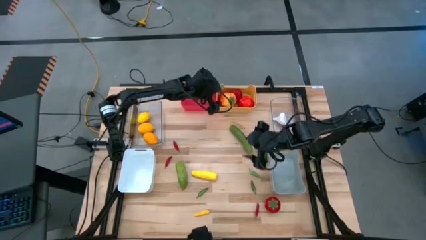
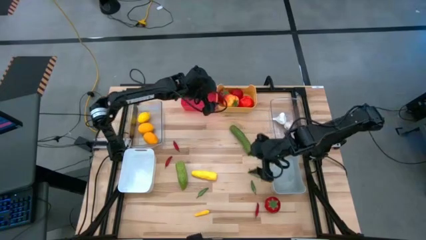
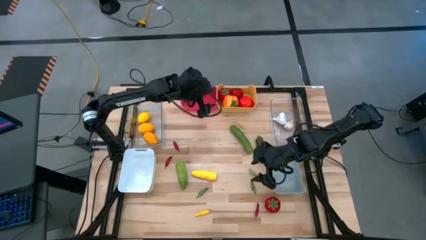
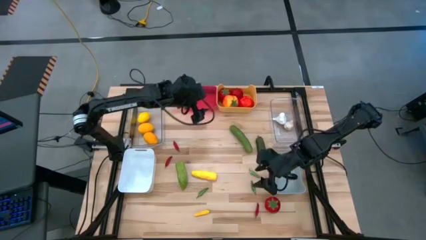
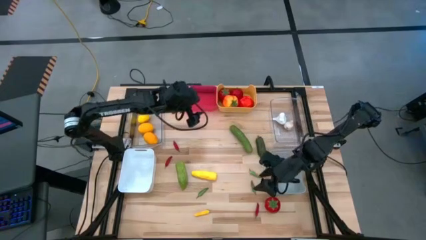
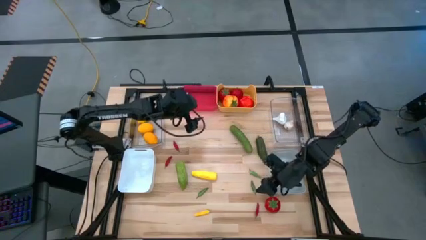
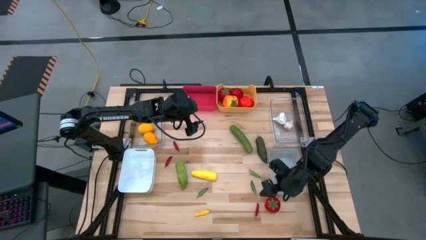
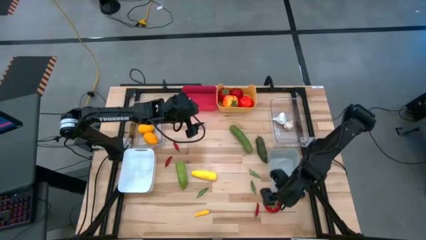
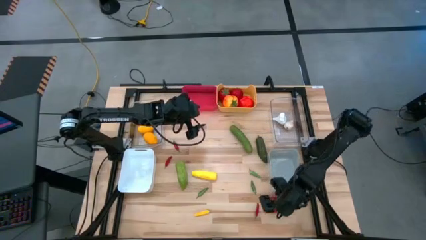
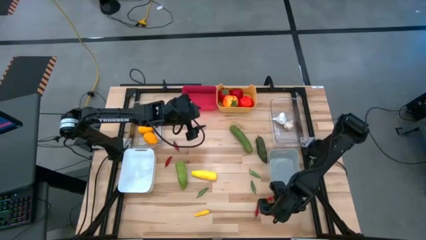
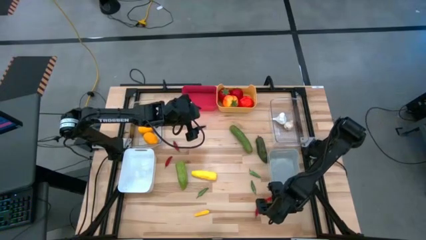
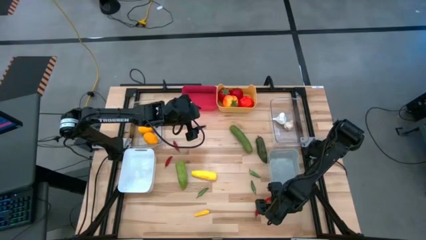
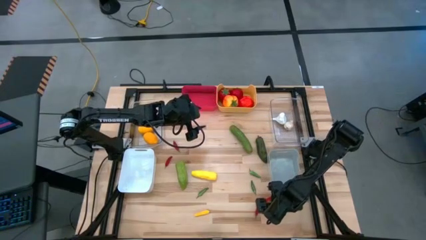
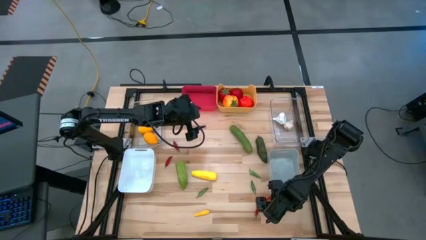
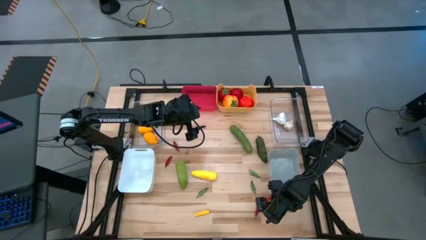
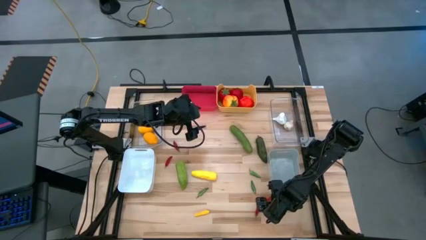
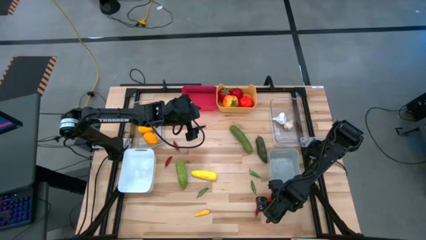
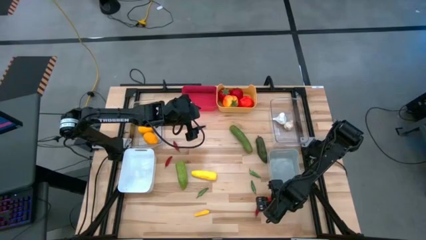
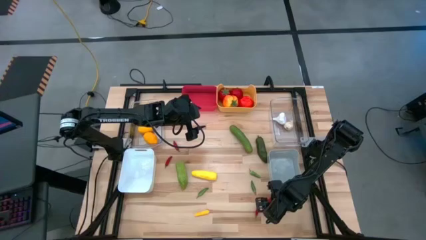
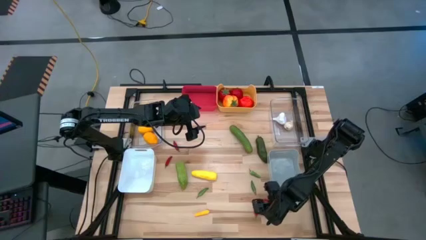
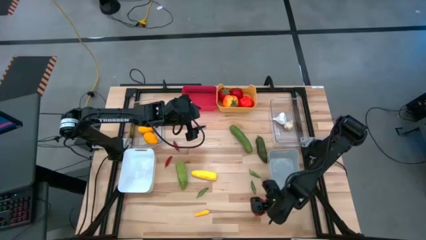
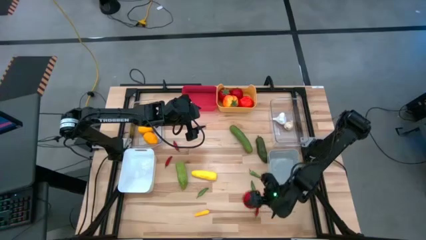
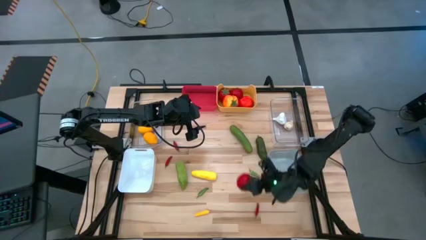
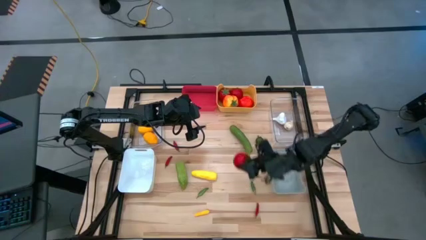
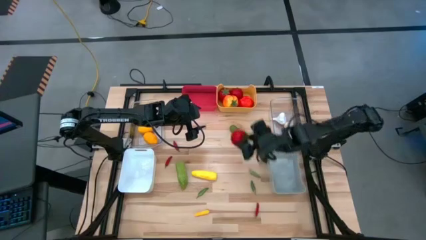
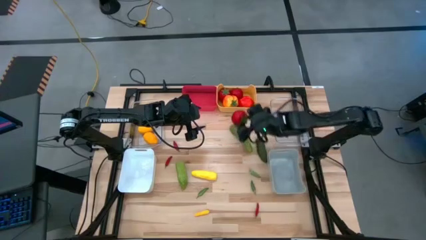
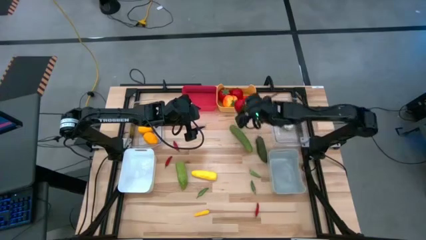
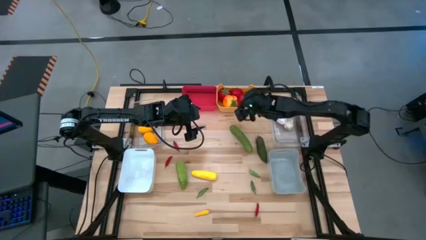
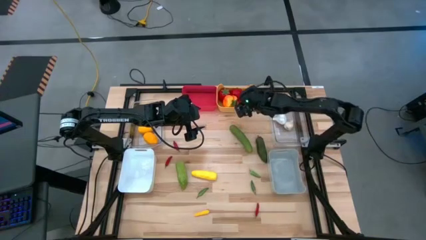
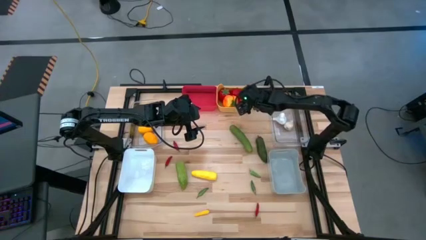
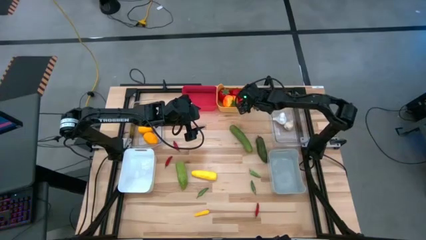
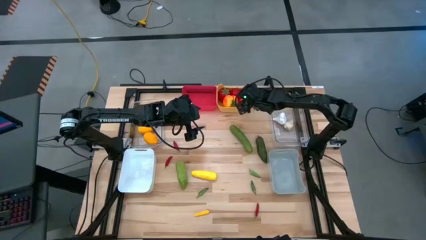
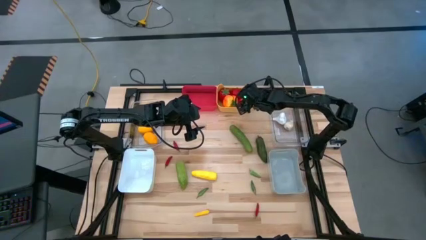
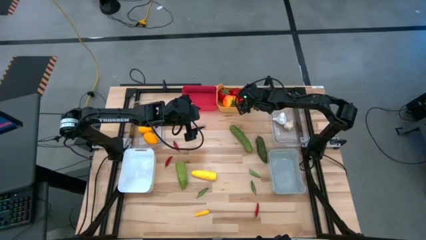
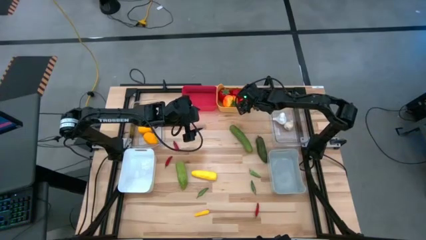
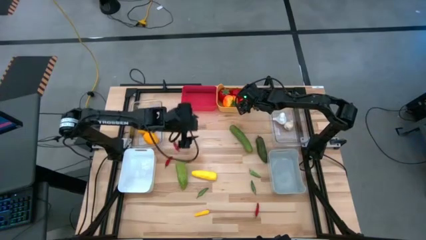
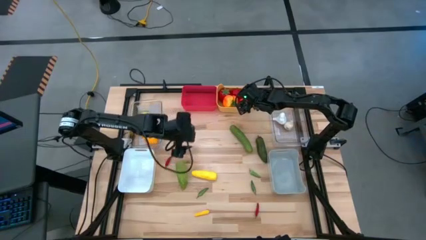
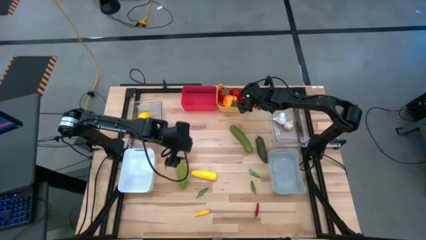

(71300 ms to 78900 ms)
Task: Sort produce into baskets
Put the red tomato into the yellow bin

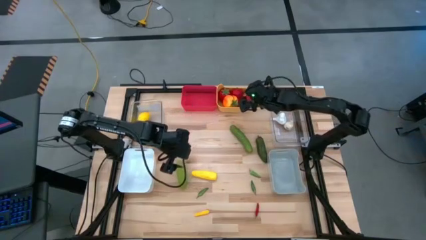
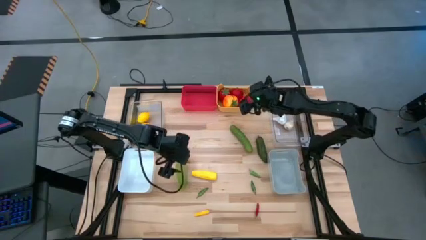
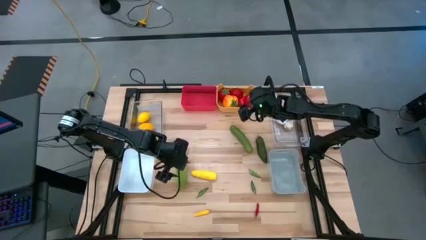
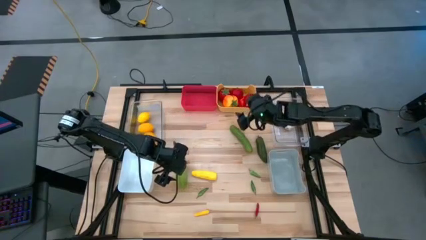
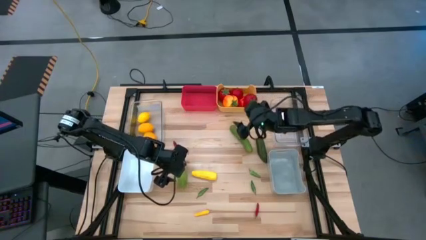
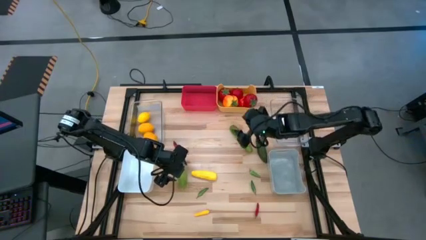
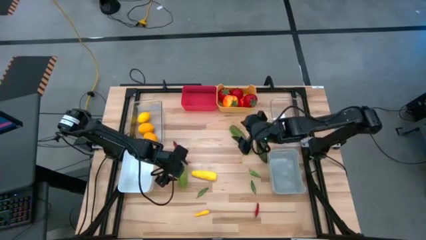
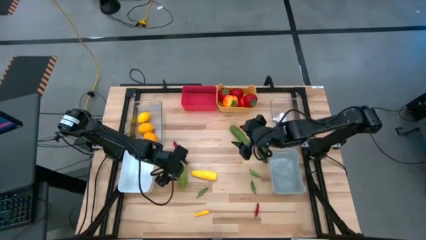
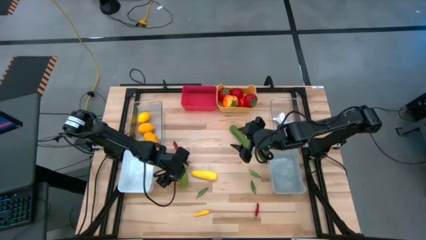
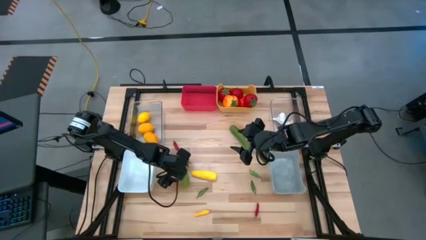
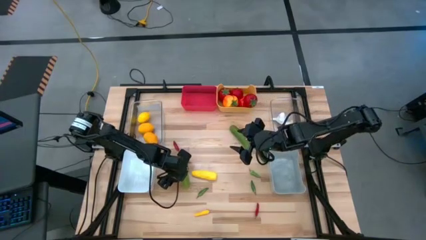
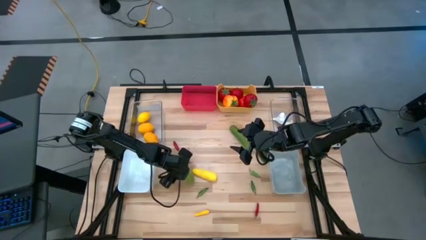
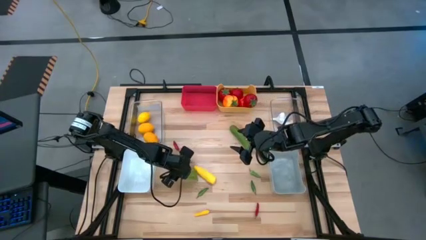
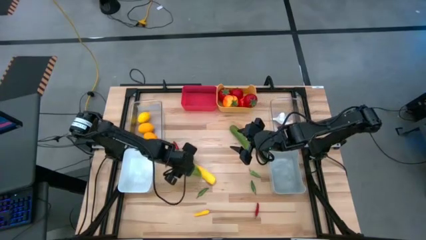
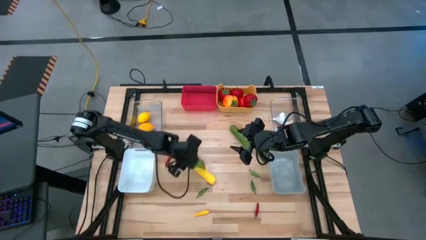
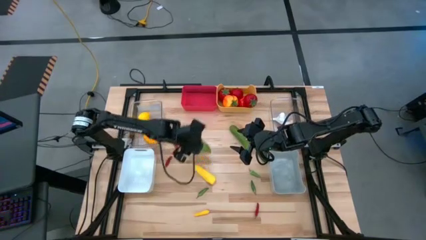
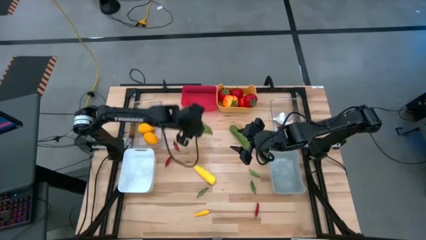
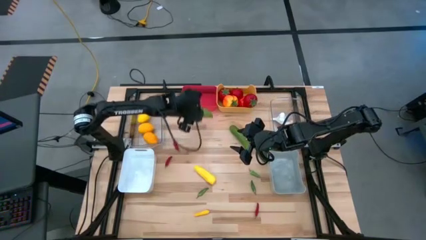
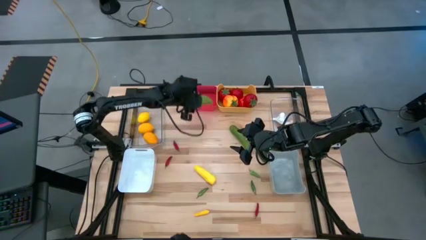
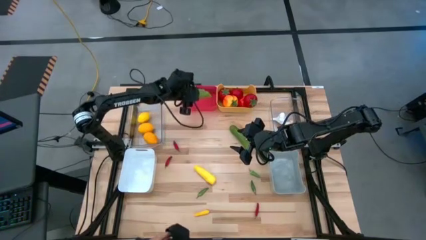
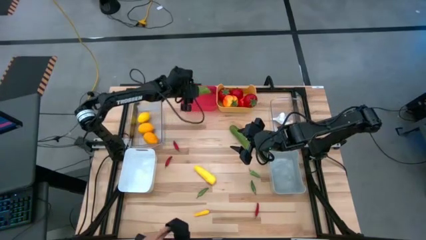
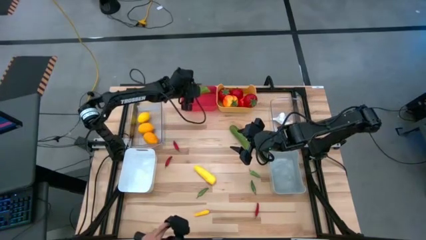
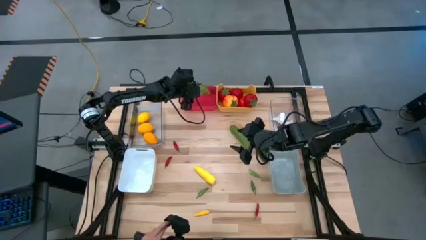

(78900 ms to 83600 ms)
Put the green cucumber into the red bin

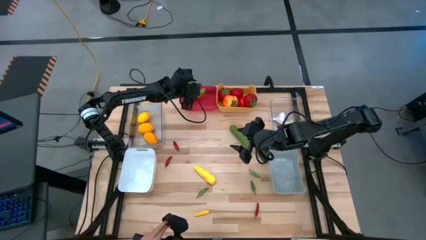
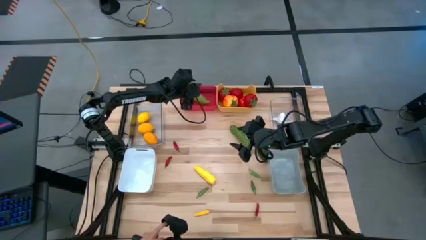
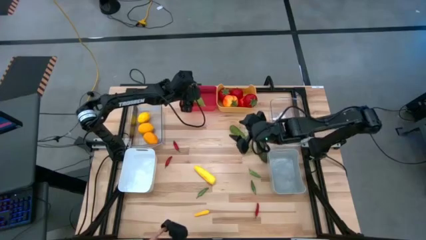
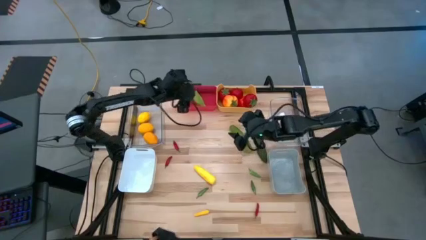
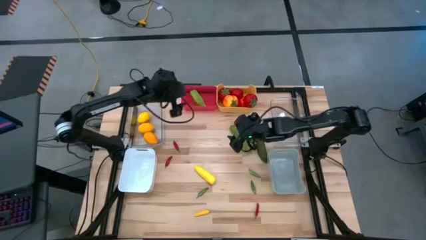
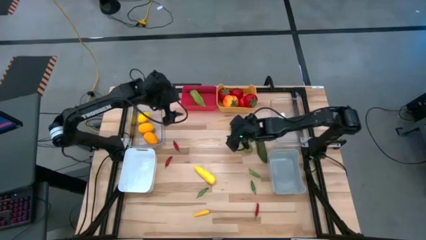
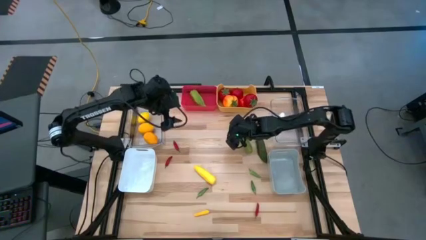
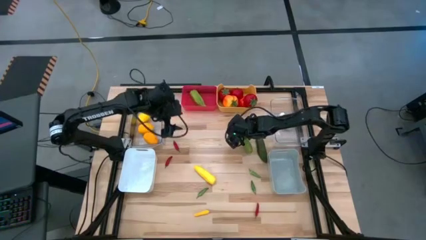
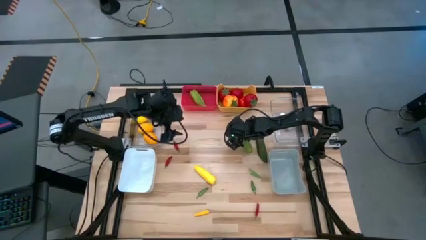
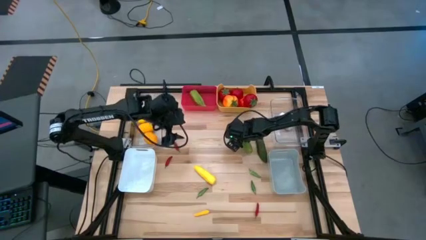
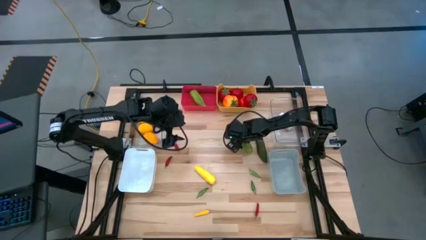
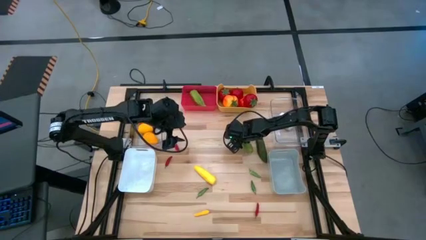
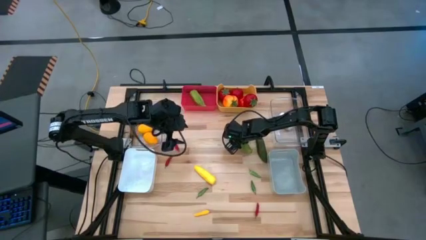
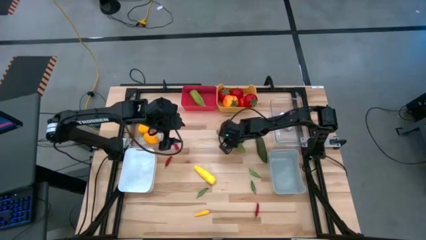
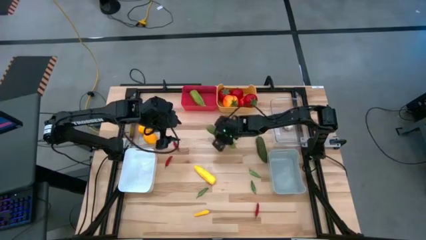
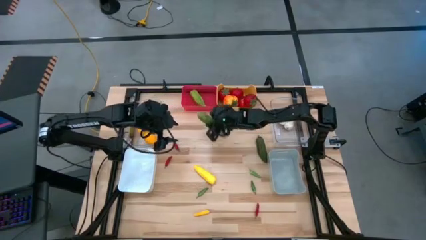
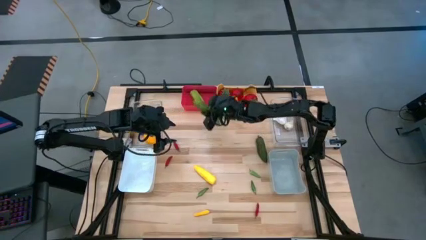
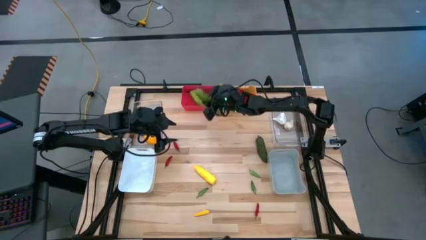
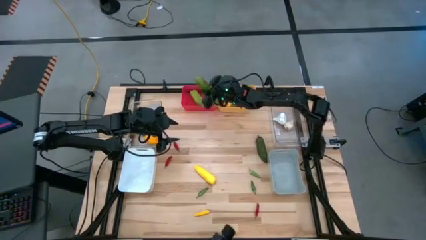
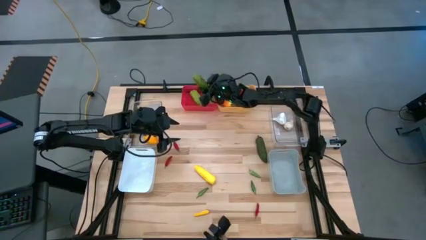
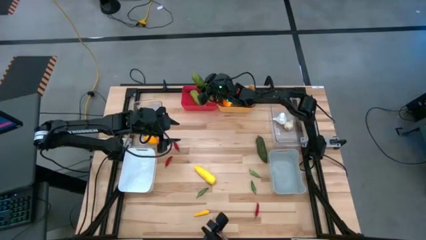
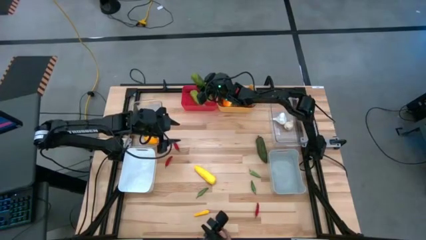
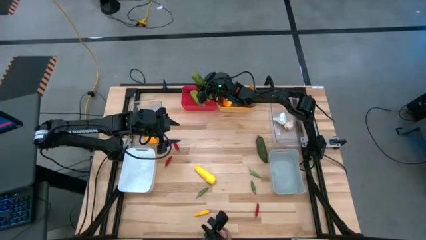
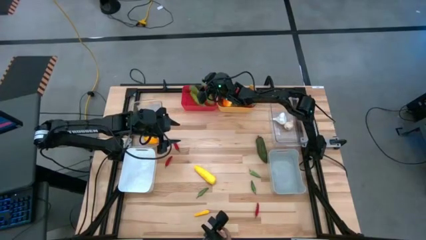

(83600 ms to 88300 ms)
Put the green cucumber into the red bin

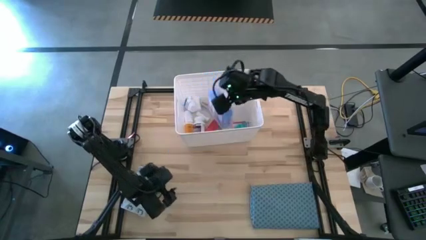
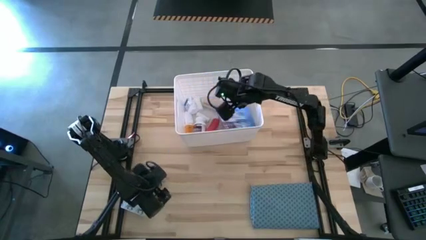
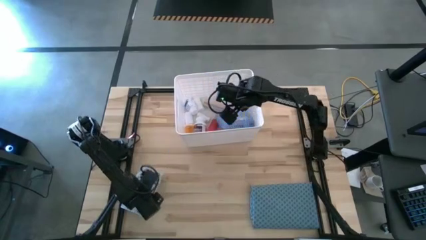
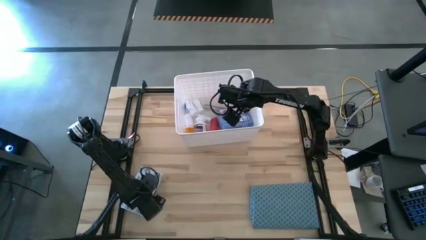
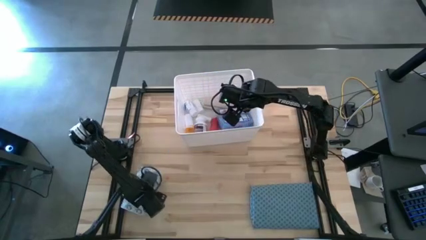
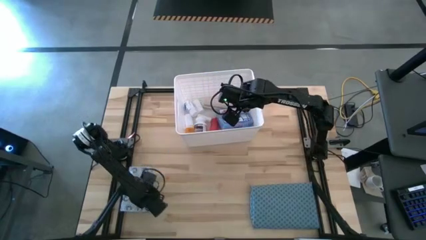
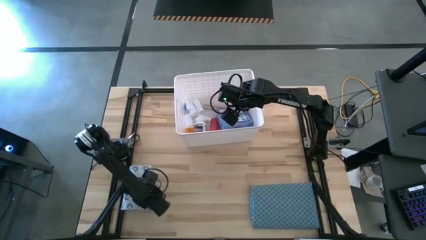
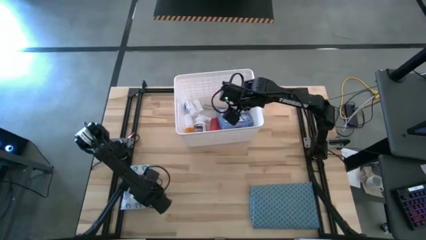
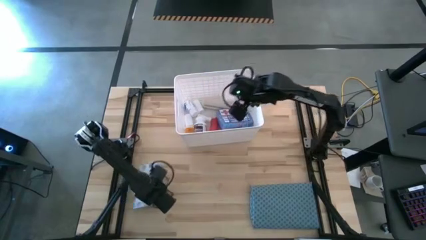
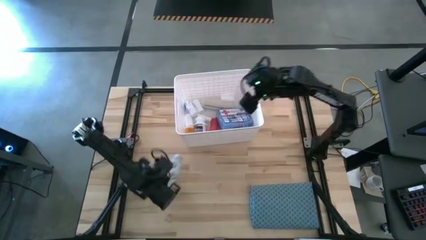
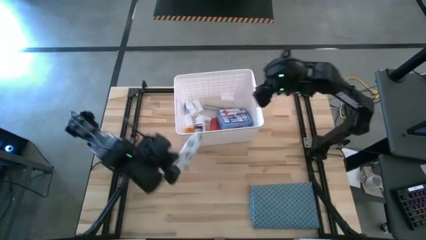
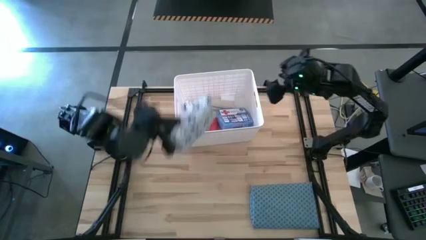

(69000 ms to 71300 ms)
Task: Pick & place medical supplies in basket/bin
Put the mailer bag into the white bin
